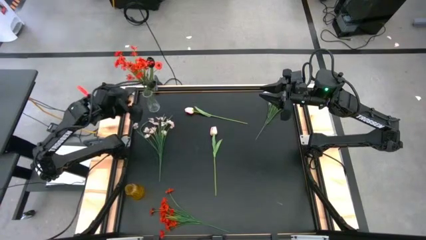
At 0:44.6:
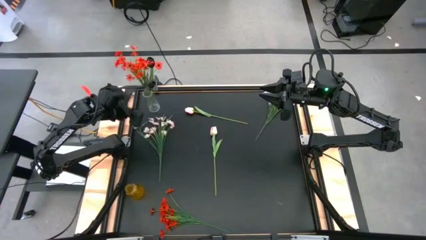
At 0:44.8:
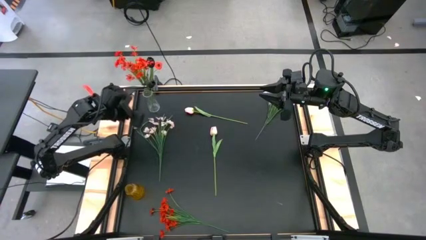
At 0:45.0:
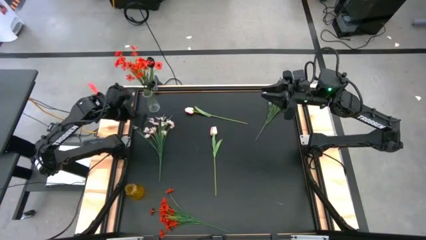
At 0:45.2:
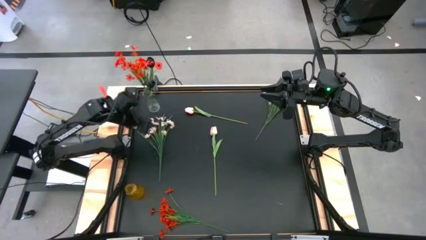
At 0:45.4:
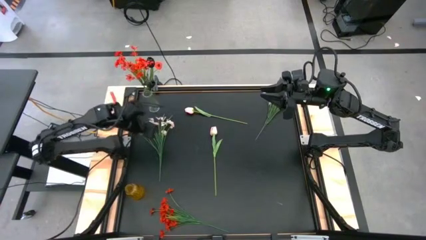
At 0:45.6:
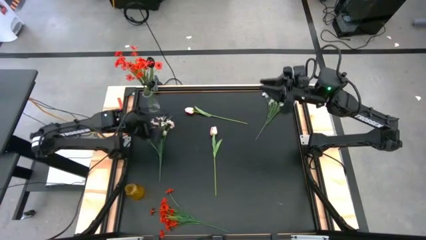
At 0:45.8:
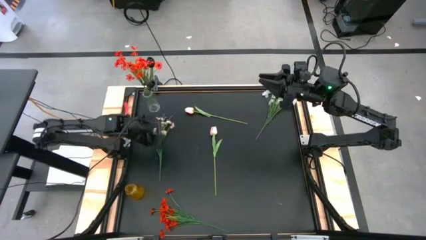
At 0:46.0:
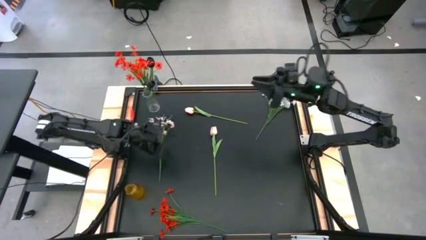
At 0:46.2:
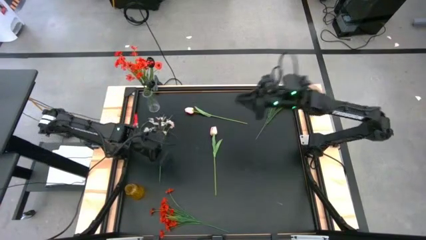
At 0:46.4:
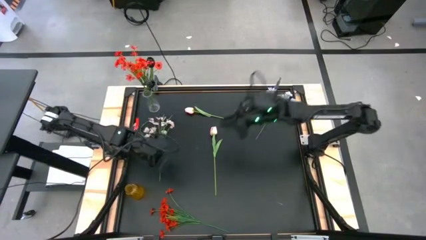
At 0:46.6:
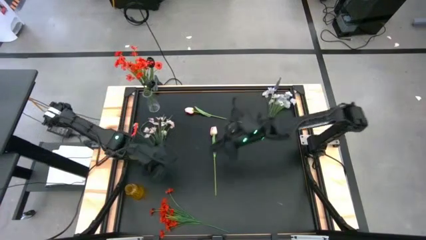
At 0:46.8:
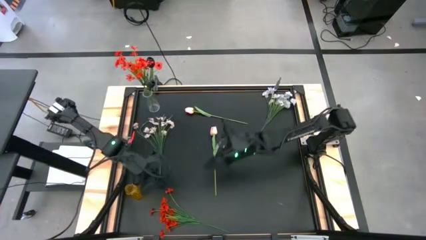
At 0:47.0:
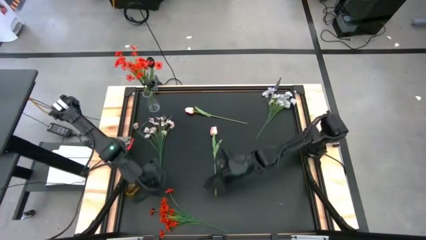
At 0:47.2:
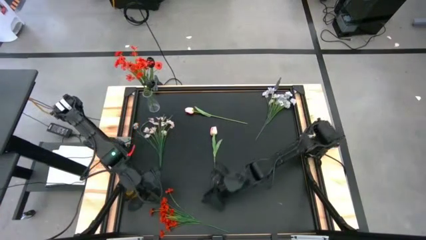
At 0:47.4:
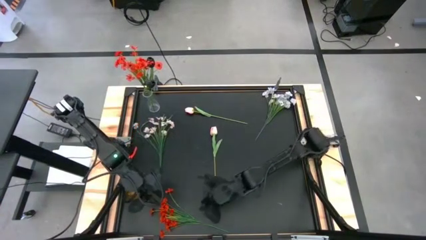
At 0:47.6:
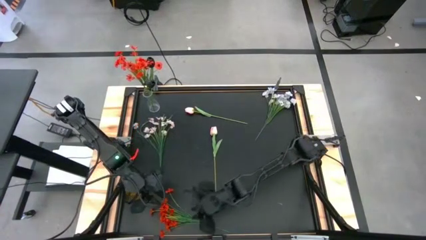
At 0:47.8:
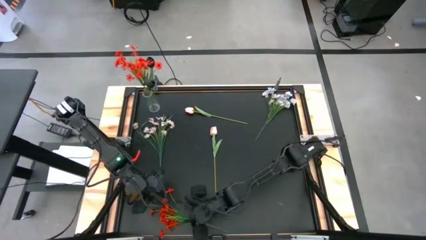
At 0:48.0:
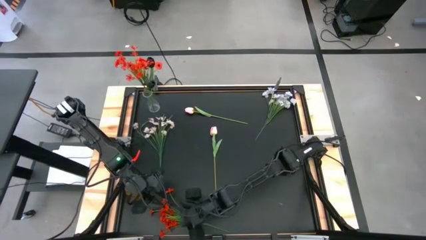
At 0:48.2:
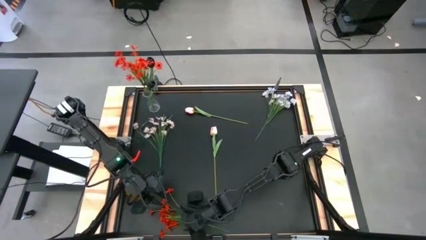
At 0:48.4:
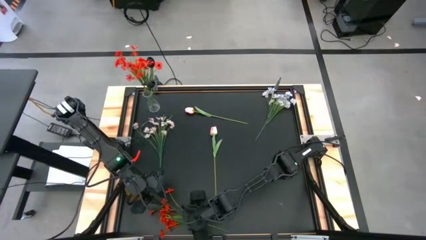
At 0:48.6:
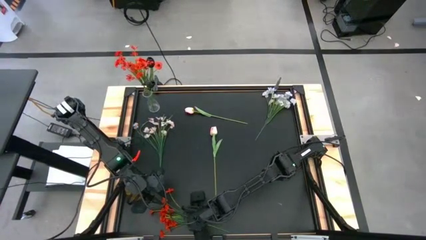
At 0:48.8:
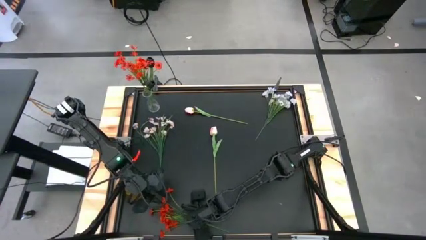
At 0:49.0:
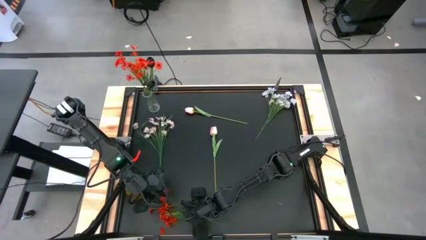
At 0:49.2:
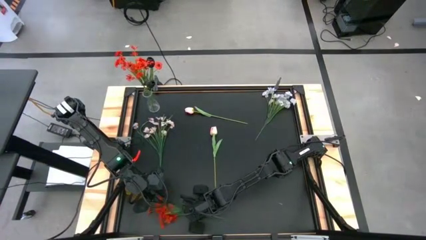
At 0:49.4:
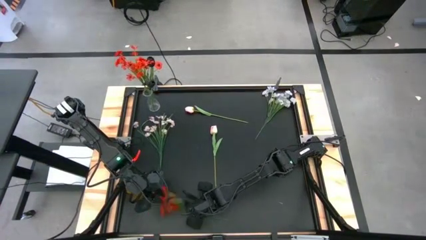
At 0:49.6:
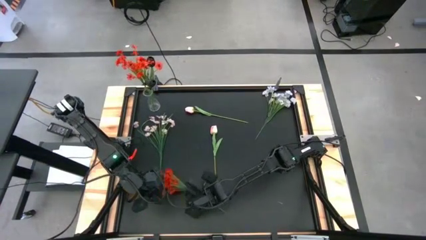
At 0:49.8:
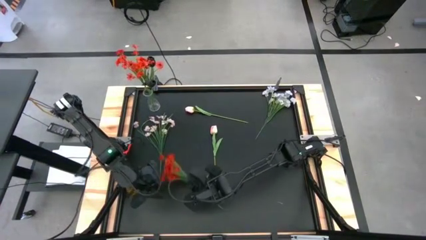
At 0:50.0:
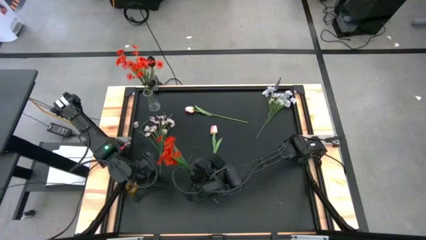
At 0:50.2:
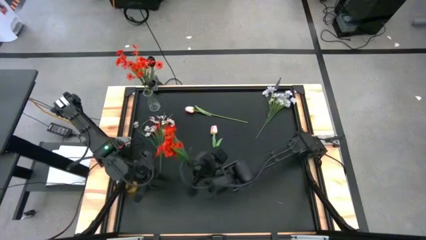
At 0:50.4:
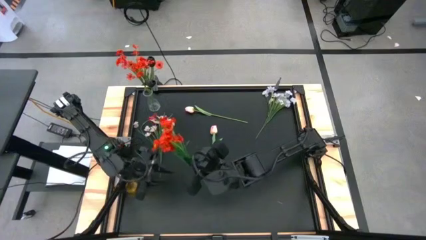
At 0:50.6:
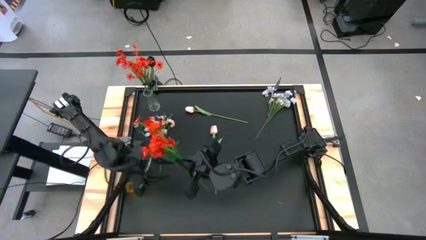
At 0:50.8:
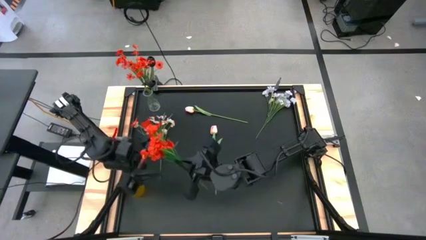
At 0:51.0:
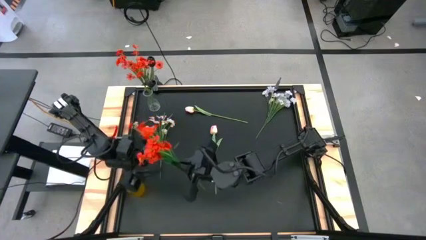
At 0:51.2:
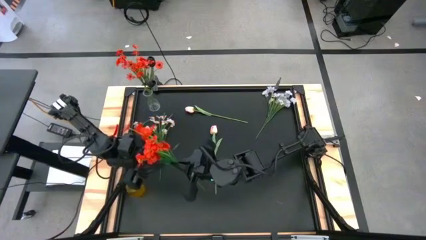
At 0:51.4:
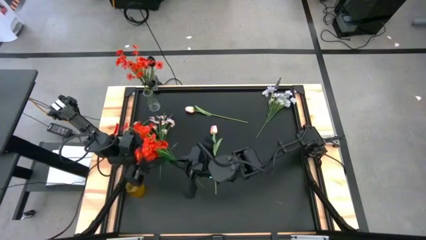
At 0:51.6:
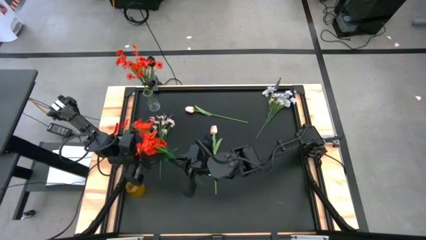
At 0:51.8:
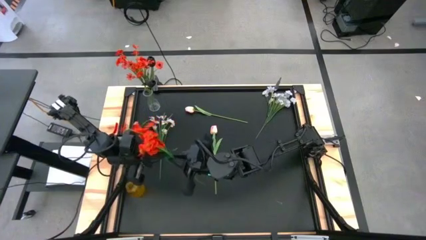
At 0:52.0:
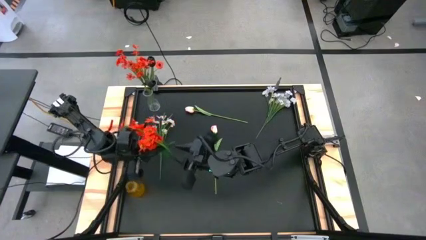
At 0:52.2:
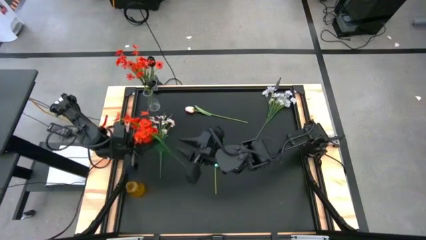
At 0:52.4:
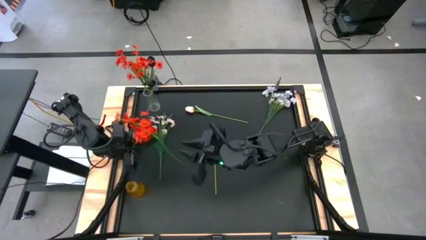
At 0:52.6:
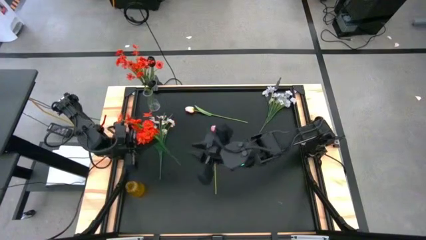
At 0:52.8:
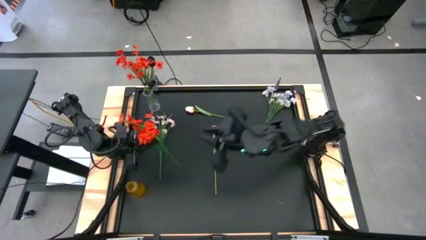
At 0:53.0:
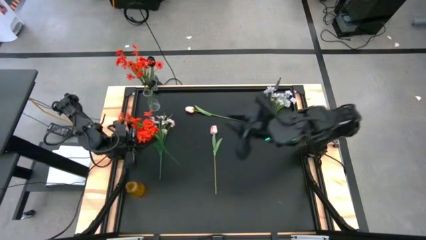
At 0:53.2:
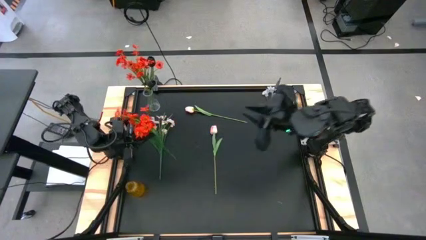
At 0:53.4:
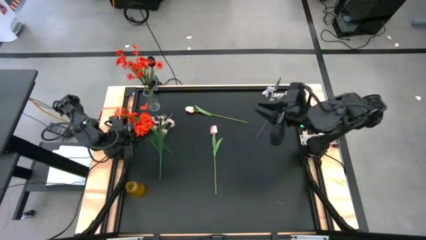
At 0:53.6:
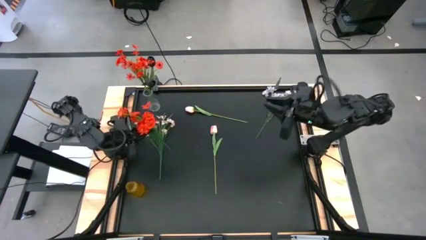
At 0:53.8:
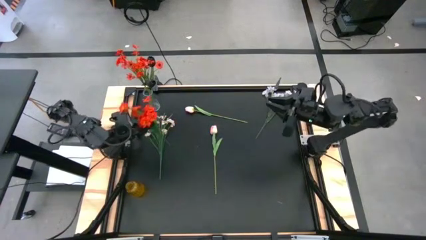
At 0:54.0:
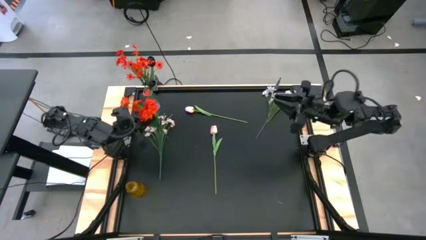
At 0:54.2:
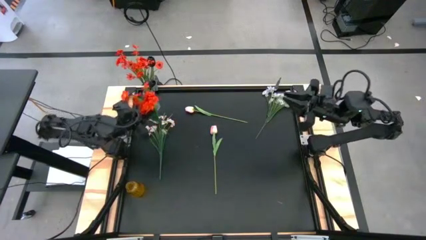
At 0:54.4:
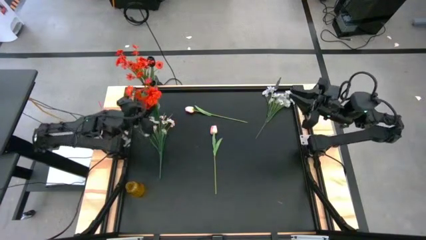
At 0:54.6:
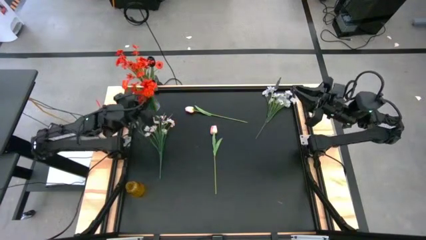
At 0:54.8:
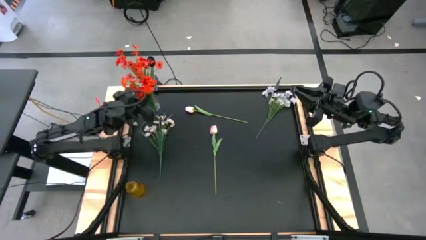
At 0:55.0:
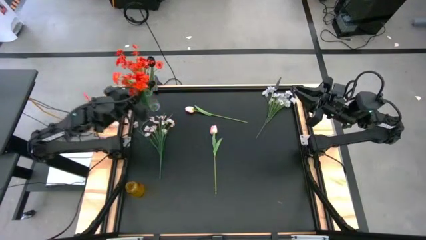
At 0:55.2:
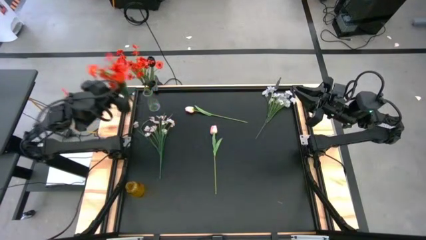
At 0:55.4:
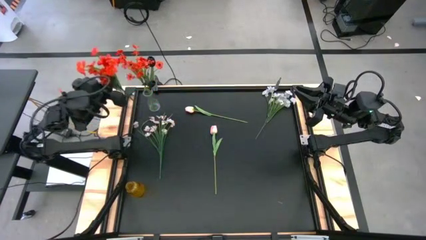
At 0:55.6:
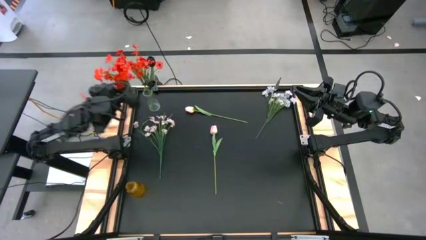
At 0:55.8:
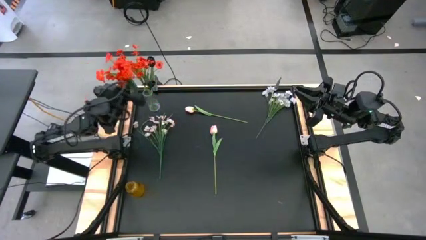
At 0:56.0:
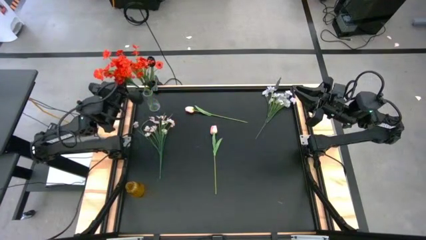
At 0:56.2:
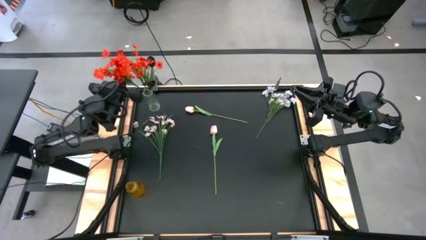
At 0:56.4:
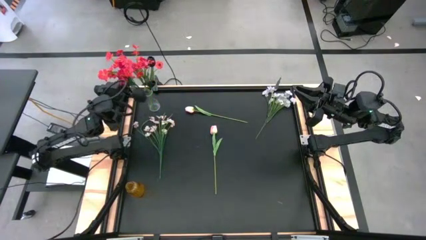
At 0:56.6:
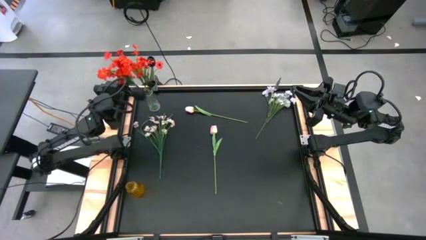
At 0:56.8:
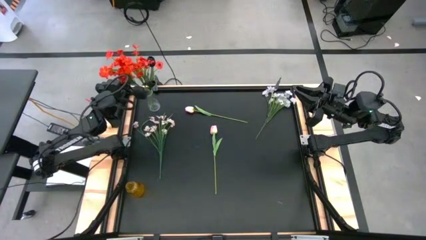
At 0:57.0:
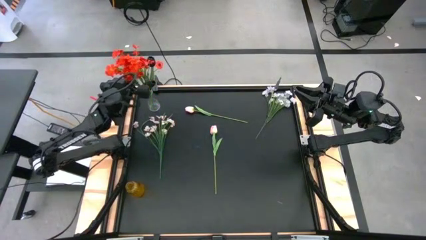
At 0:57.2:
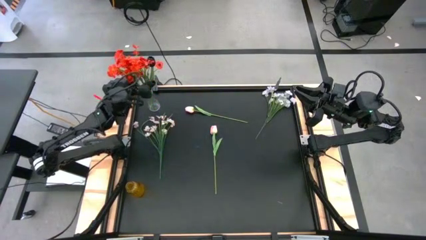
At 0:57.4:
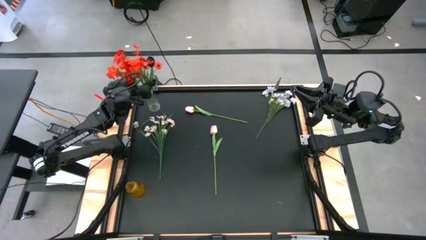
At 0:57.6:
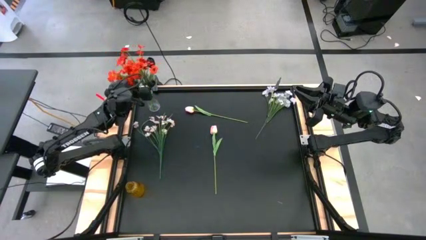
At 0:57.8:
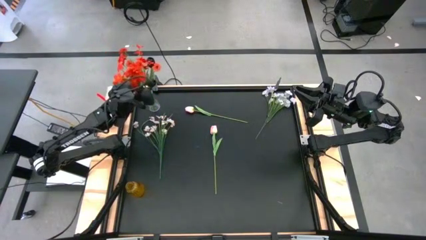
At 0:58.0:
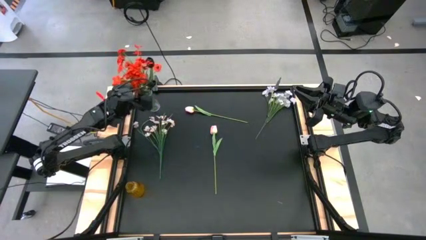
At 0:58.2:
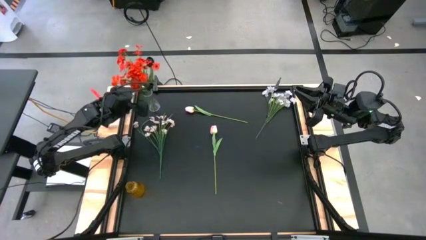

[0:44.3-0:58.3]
Task: Sort flowers into vase by color
Put the red flowers into the transparent vase

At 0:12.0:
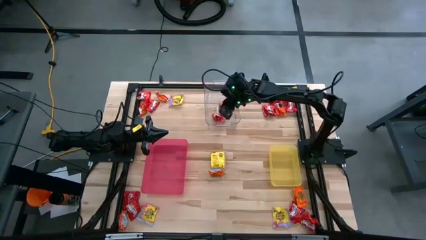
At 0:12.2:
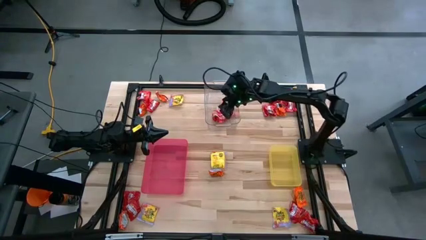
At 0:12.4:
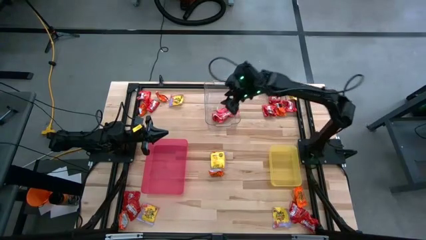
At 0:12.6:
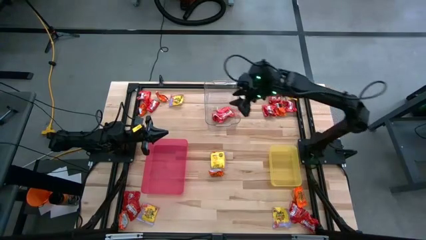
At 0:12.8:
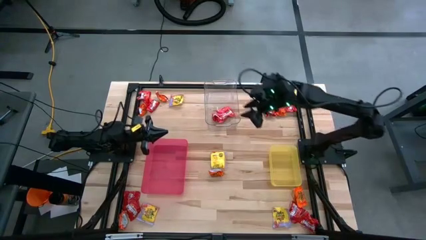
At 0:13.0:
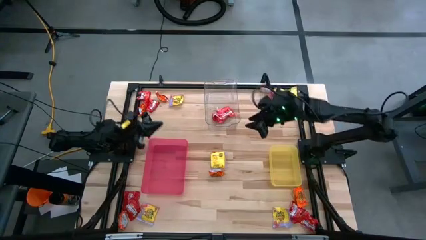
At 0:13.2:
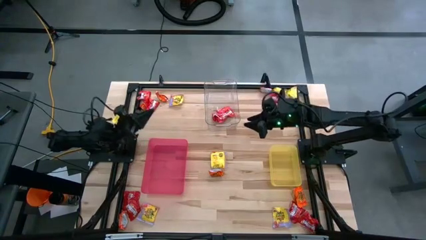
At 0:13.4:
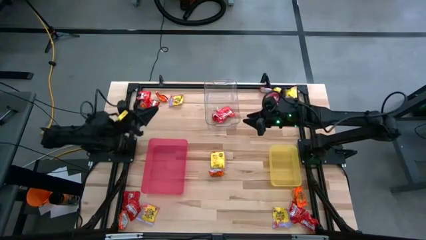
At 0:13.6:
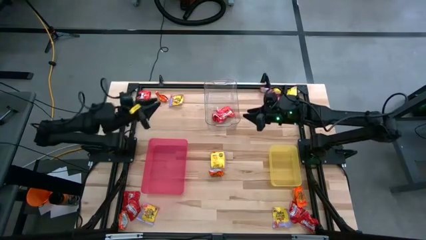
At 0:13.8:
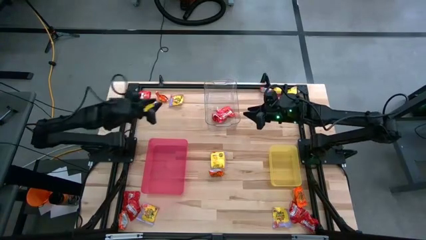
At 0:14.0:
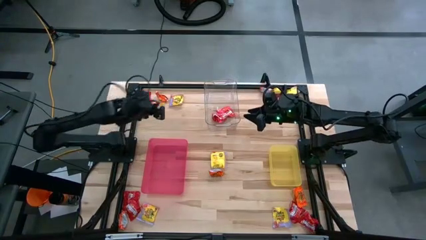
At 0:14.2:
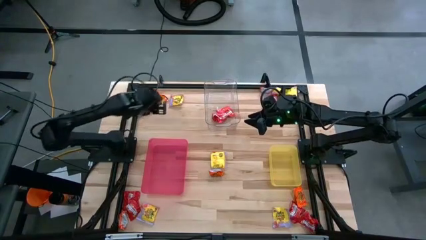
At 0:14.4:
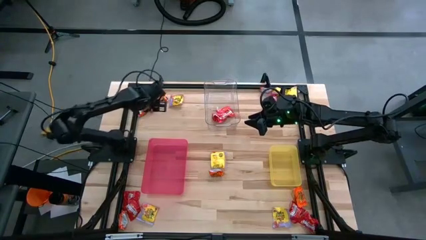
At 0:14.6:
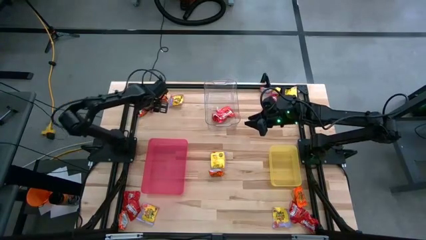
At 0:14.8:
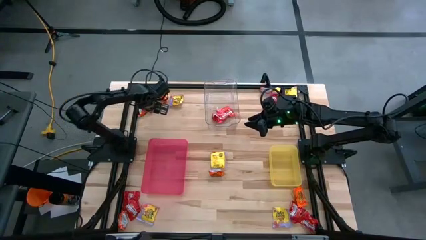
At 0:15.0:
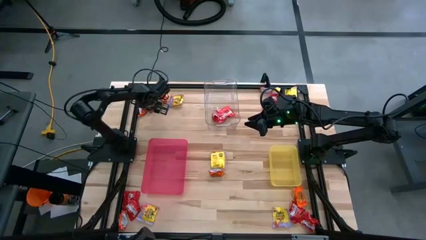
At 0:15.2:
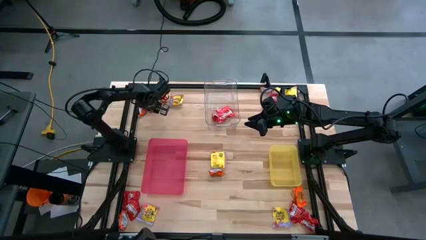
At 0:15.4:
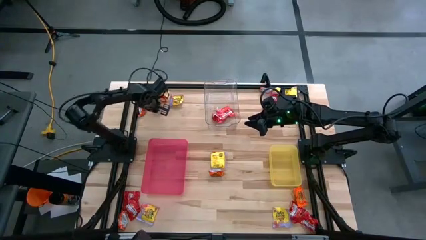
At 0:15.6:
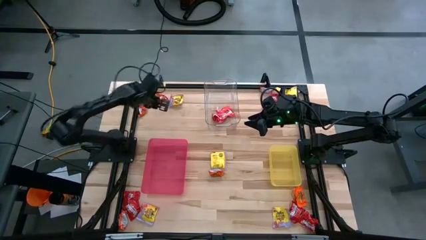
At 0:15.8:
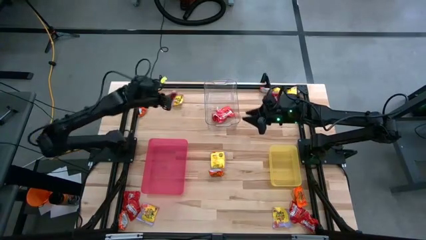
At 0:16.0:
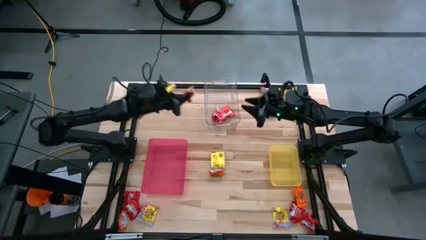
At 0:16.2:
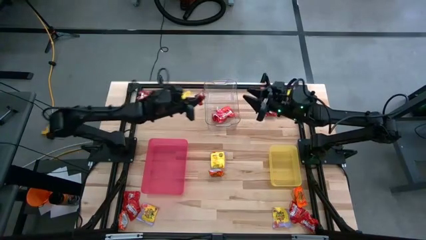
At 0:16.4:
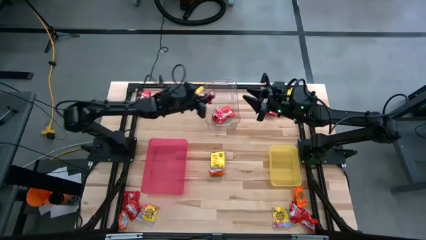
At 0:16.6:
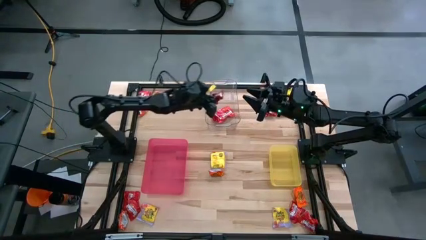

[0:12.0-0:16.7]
Task: Sort candy
Put the red candy into the transparent bin
